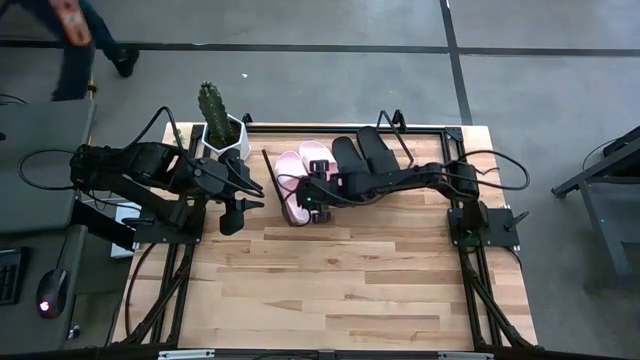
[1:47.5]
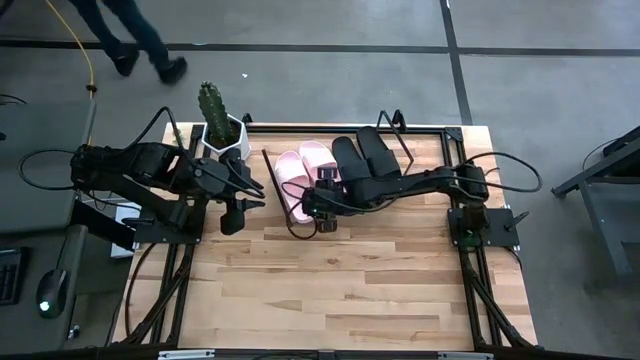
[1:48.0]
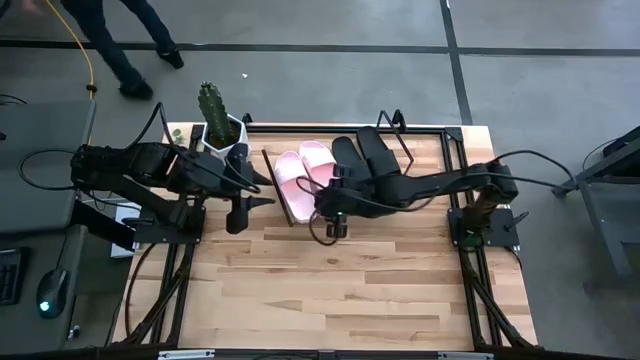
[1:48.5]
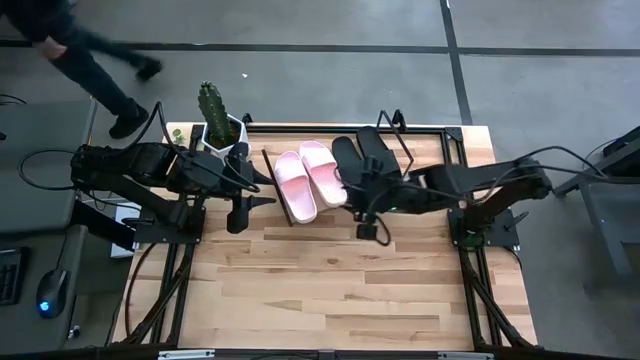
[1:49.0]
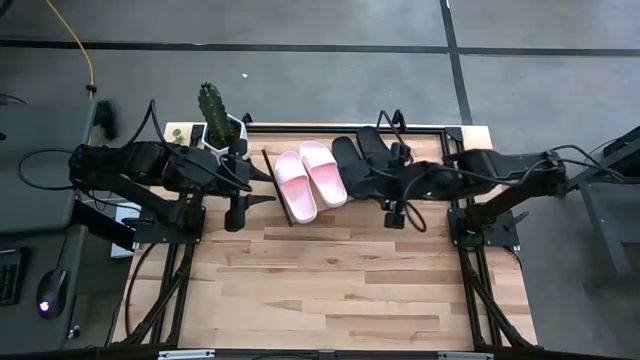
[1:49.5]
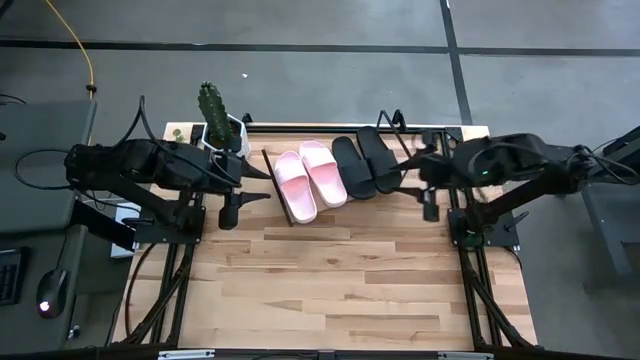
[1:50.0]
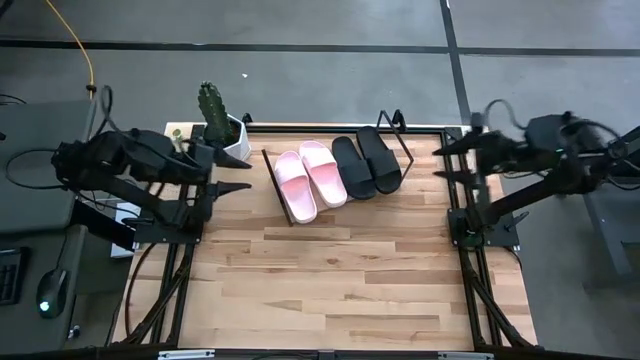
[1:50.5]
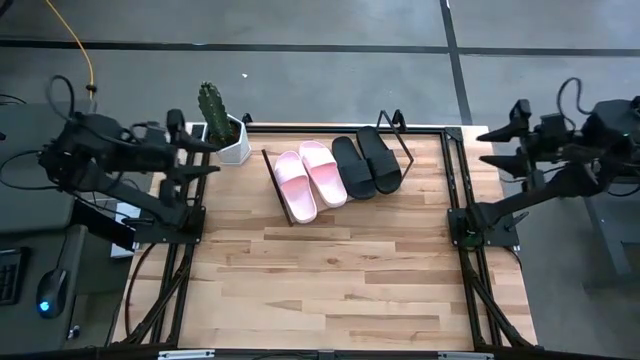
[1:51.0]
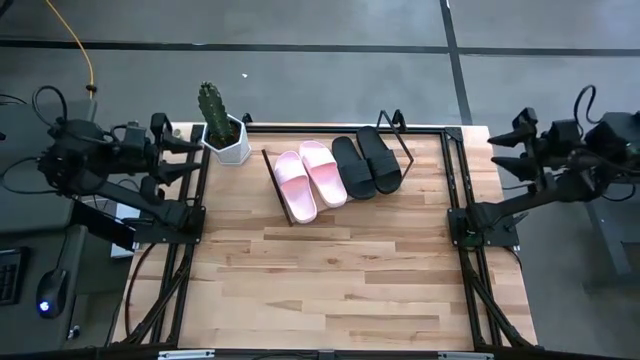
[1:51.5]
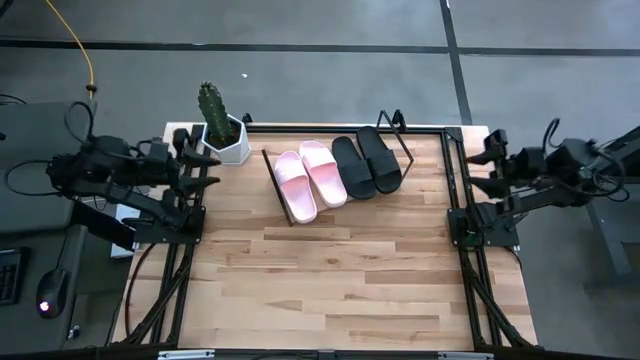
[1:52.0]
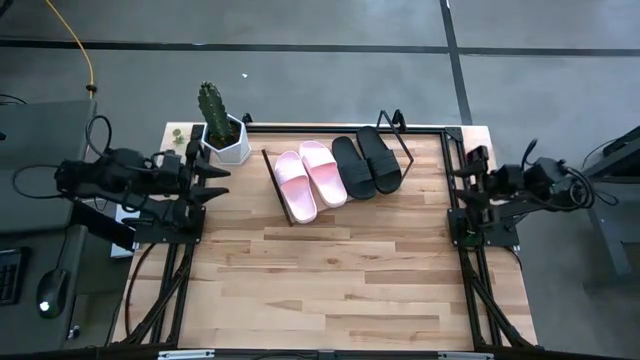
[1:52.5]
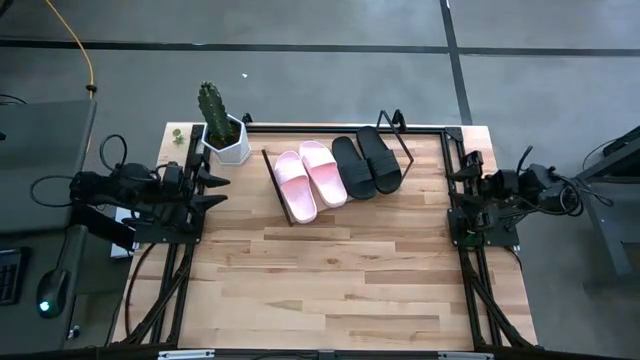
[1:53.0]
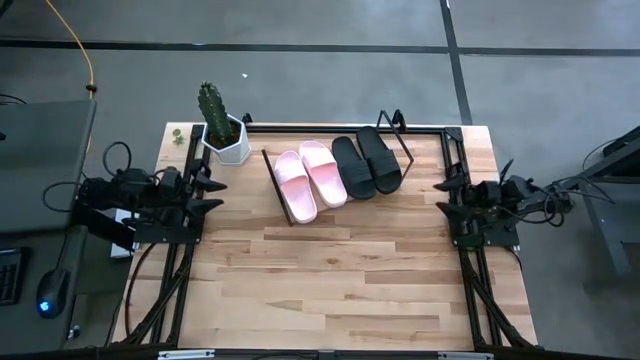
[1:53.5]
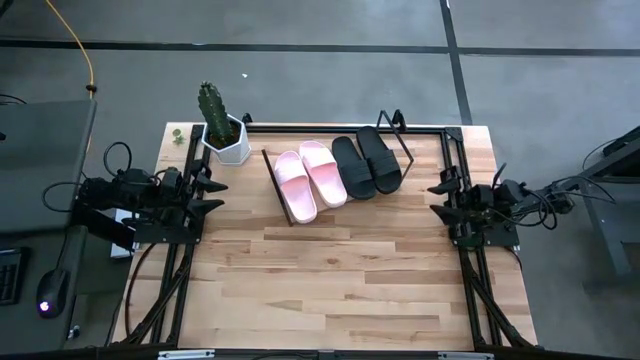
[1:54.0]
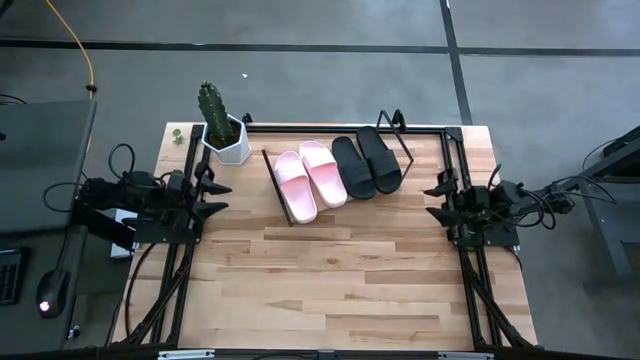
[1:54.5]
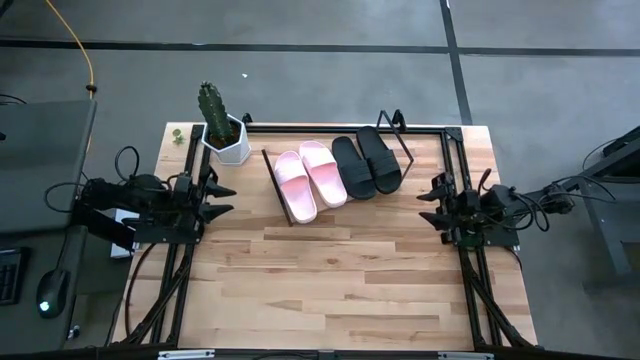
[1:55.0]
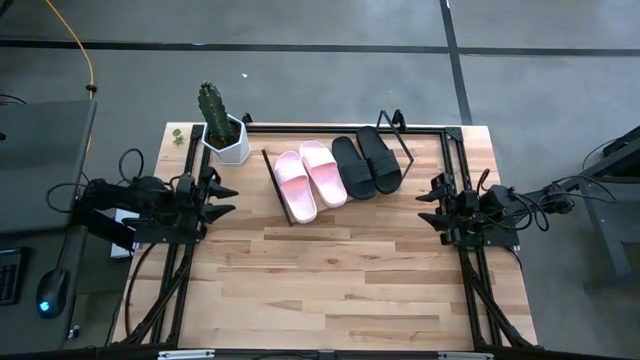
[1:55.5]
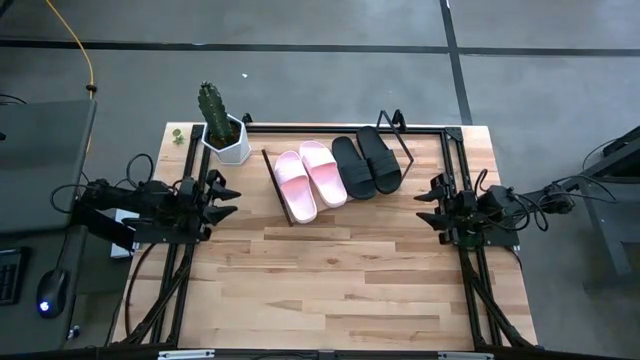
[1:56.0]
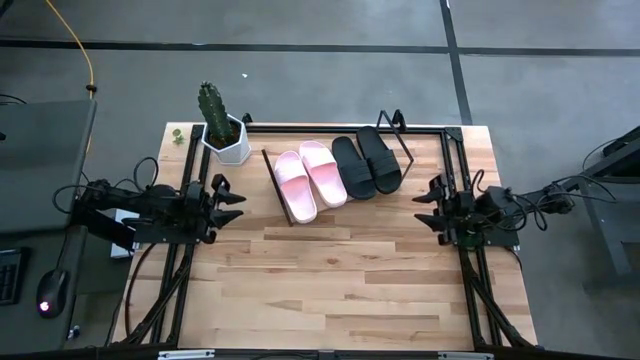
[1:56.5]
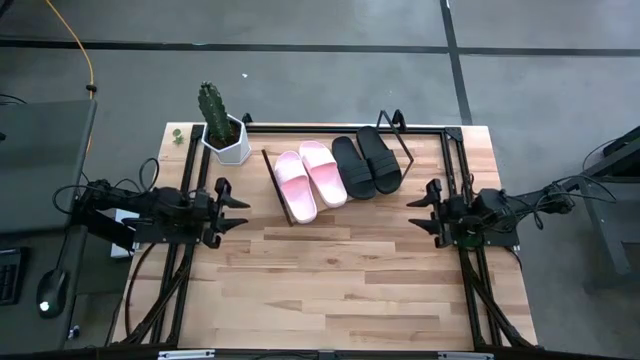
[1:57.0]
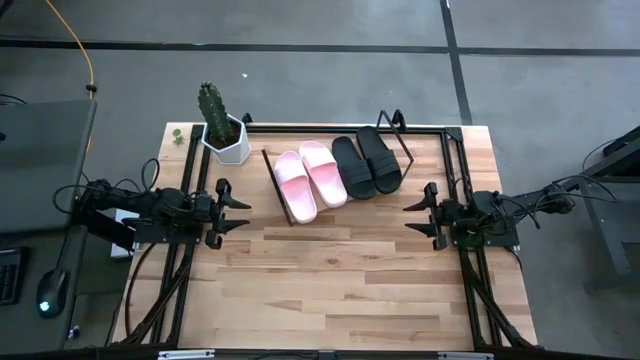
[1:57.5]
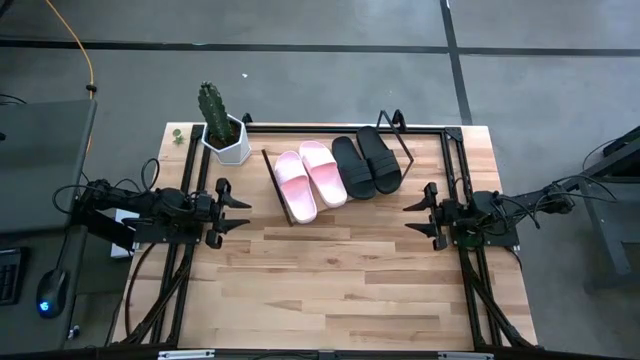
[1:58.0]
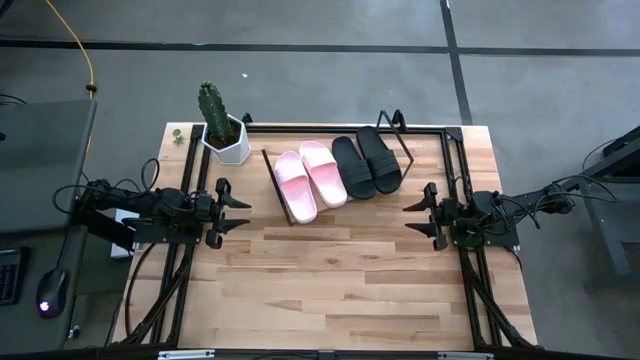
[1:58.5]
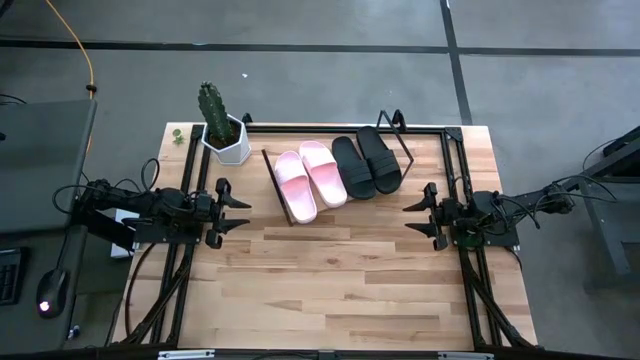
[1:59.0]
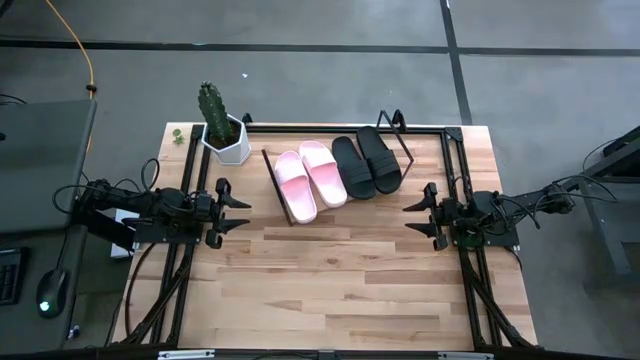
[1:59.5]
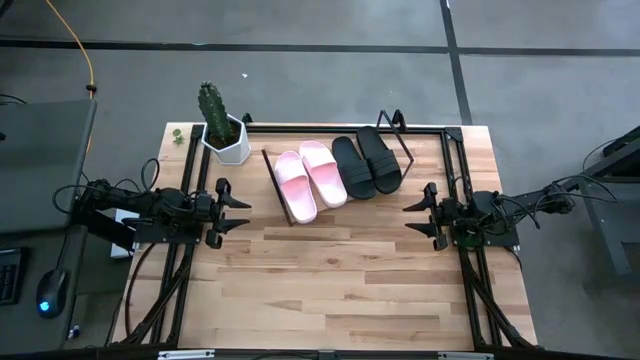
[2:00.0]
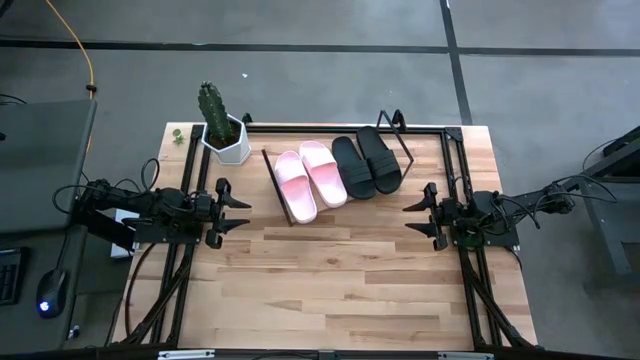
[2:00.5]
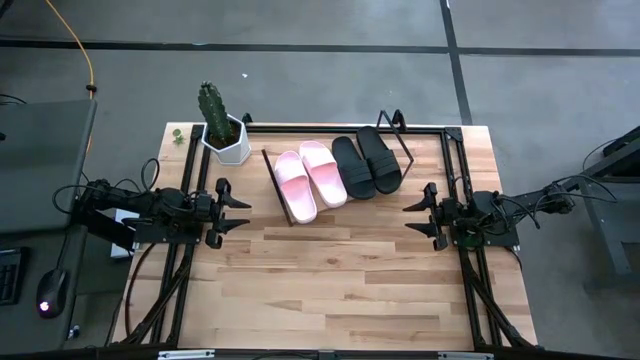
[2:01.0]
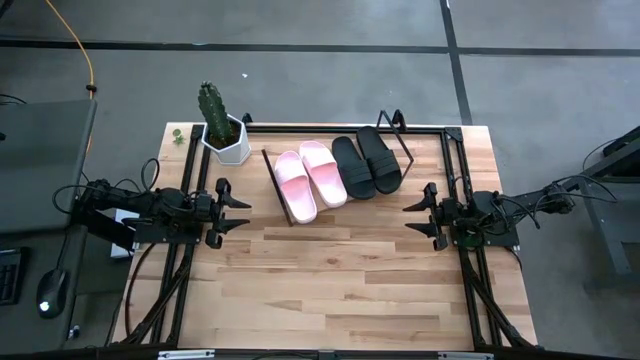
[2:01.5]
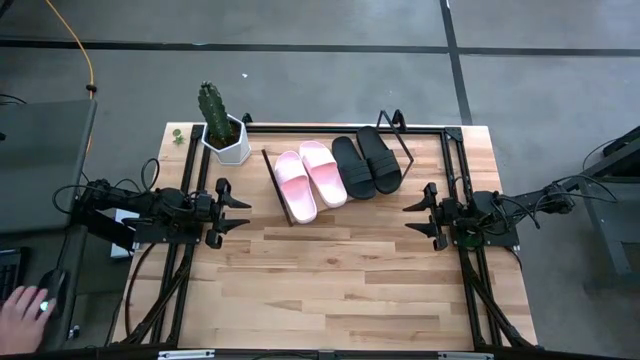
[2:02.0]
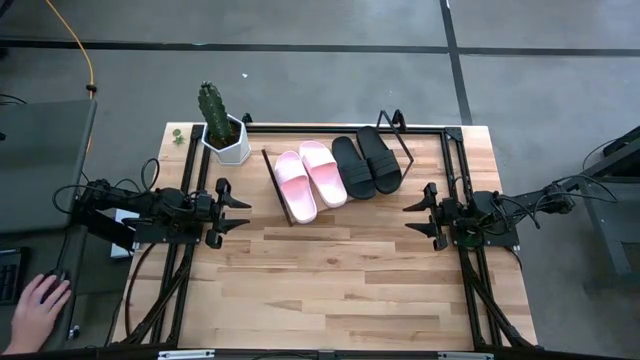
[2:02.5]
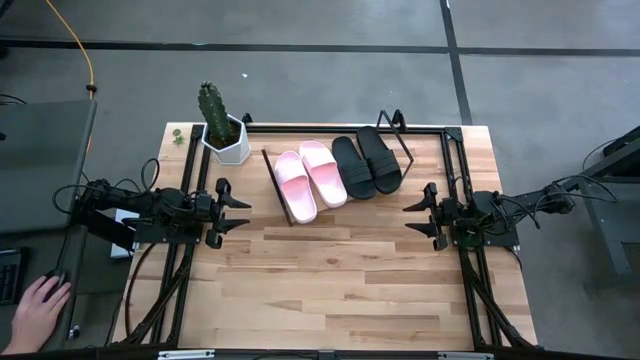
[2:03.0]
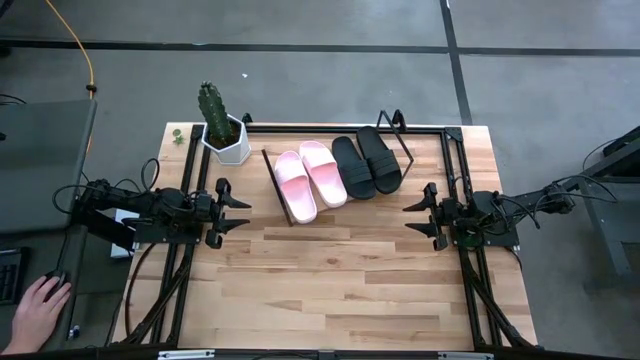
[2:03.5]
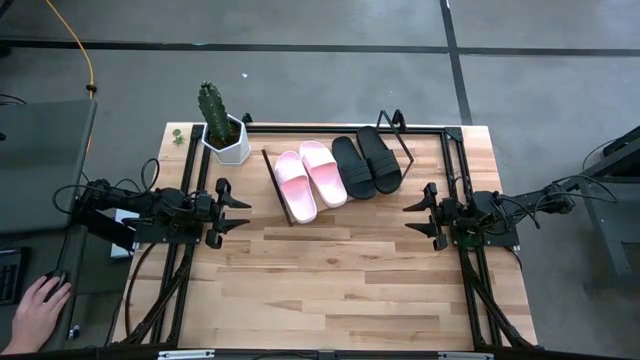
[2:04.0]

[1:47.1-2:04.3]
Task: Pick and place slides into the shelf
Return to Home Position

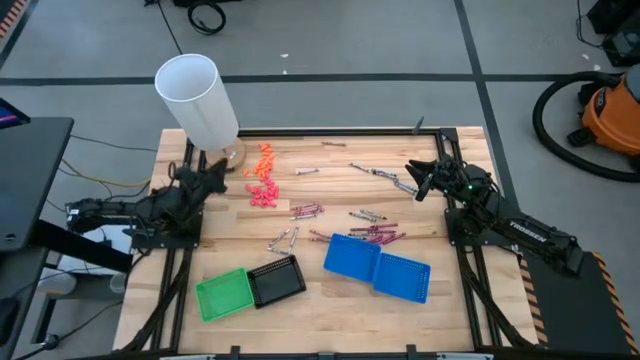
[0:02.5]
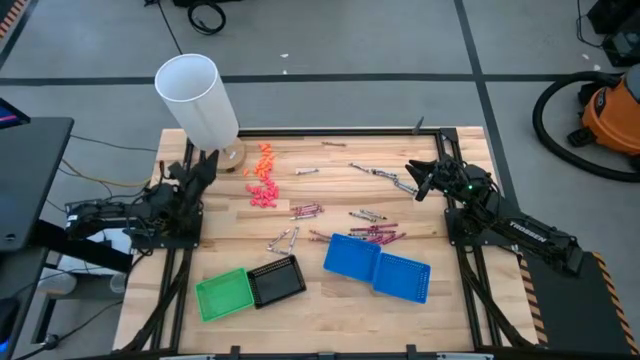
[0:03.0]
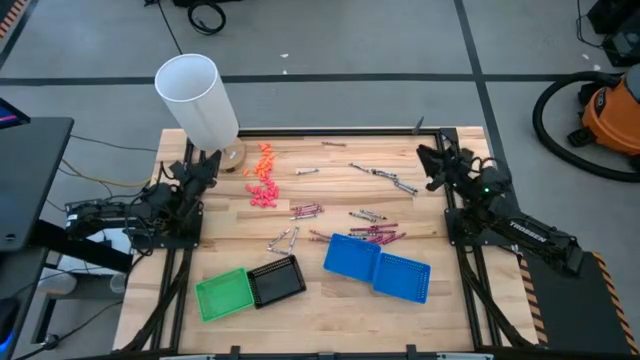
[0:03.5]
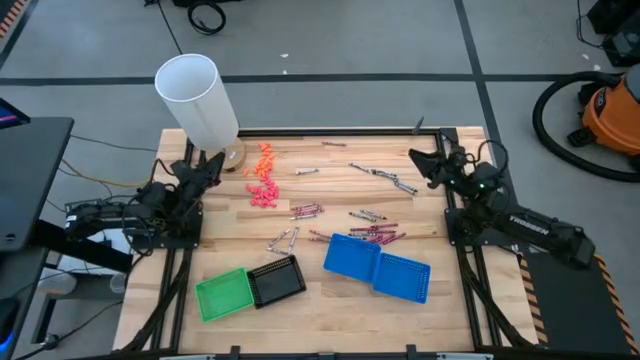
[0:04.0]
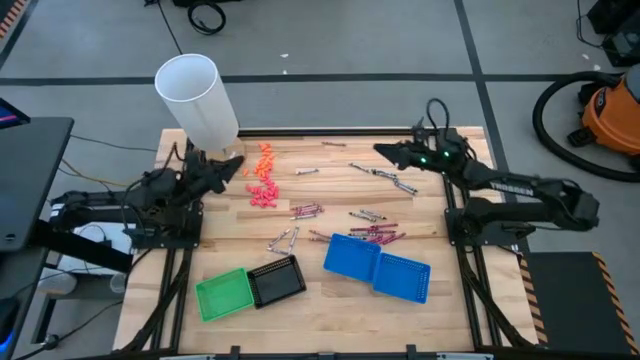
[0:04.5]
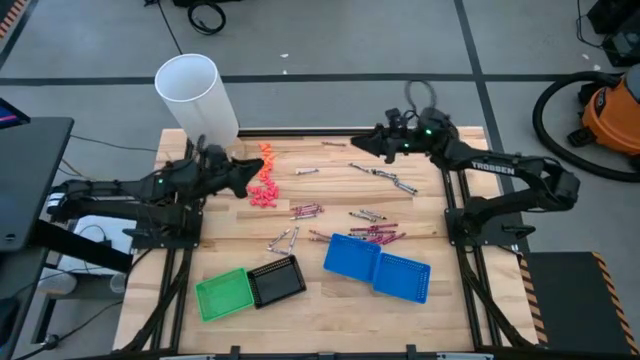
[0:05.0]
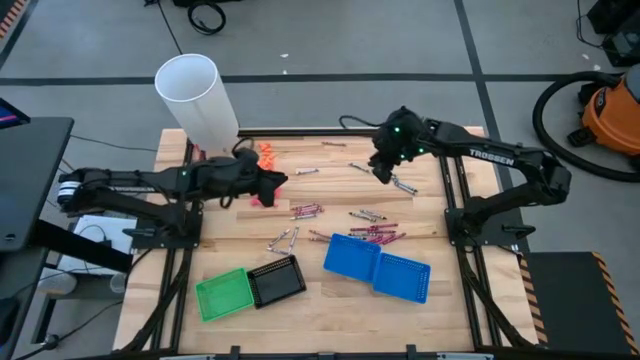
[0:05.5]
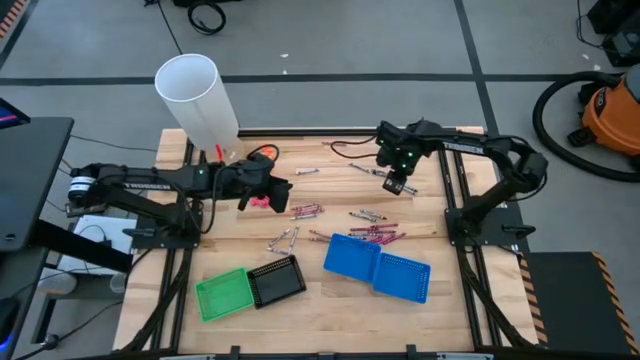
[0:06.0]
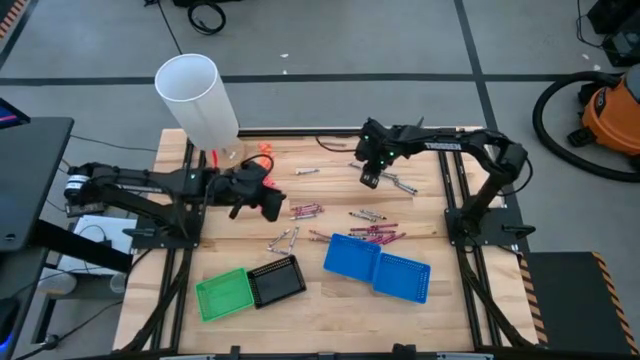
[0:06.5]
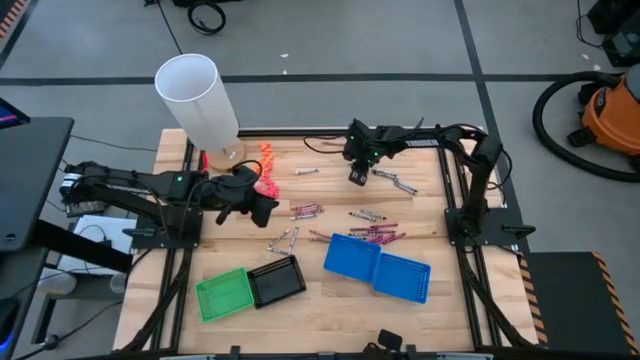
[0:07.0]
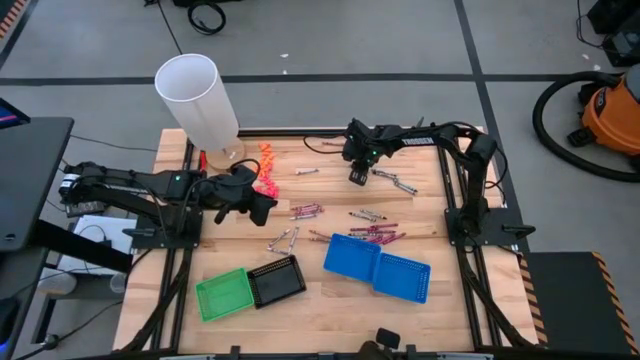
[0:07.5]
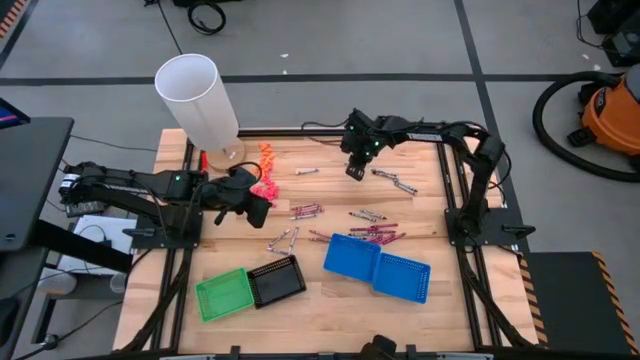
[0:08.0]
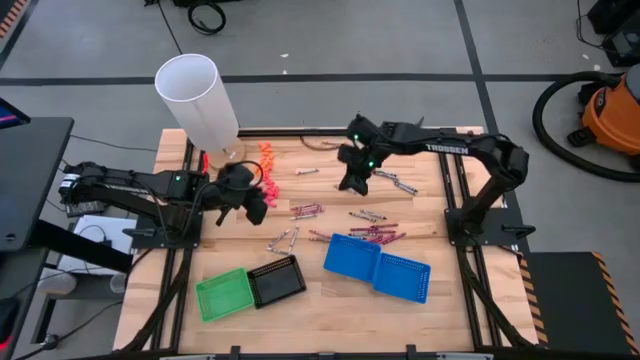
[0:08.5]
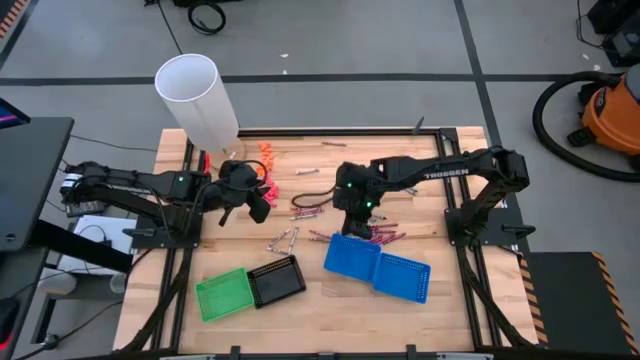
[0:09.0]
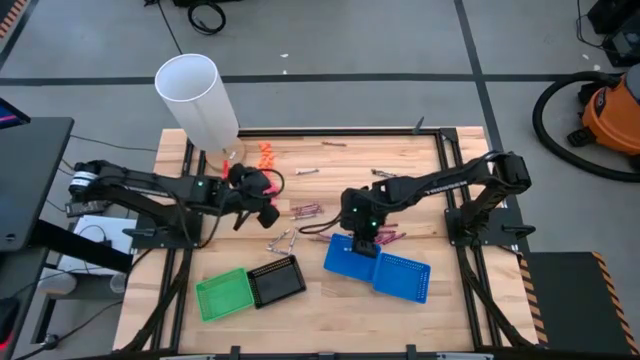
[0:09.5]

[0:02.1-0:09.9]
Task: Sort crayons
Put the white crayon into the left blue bin
